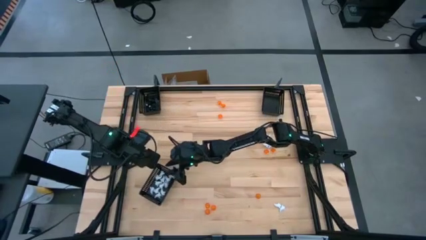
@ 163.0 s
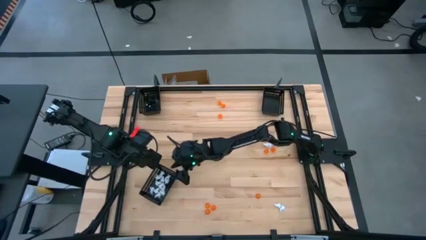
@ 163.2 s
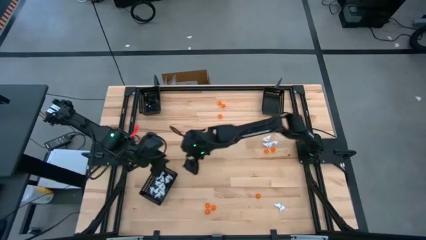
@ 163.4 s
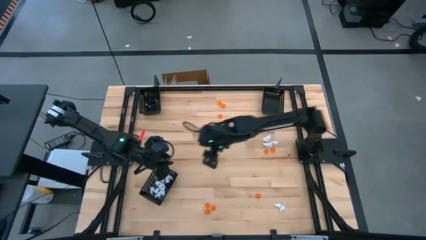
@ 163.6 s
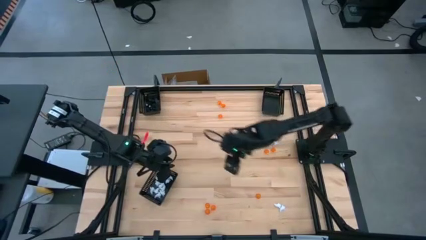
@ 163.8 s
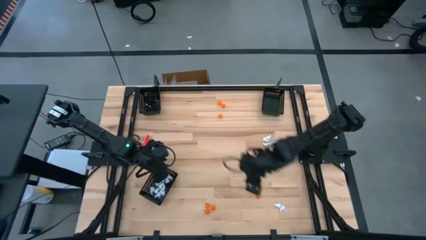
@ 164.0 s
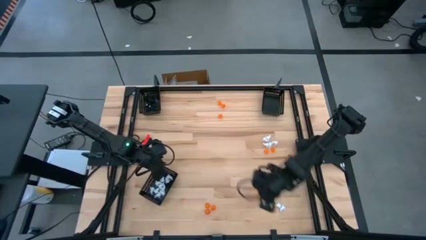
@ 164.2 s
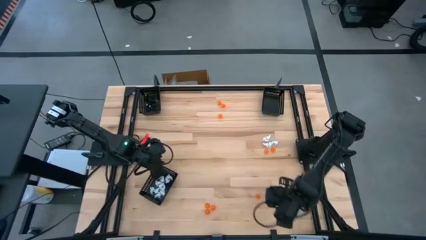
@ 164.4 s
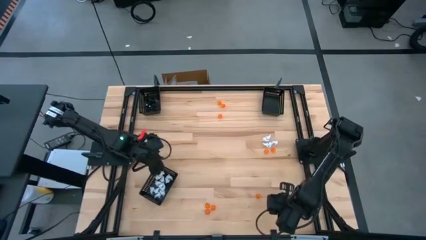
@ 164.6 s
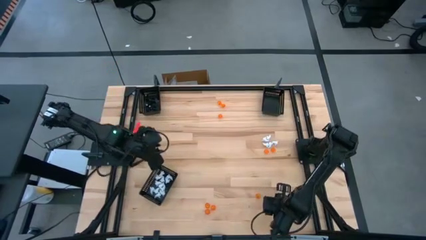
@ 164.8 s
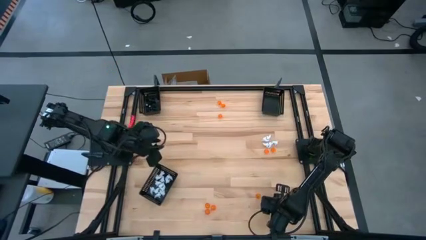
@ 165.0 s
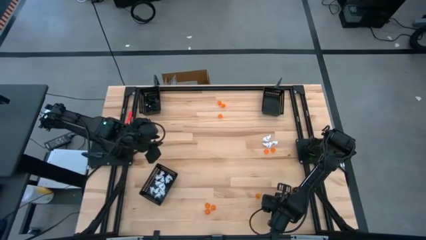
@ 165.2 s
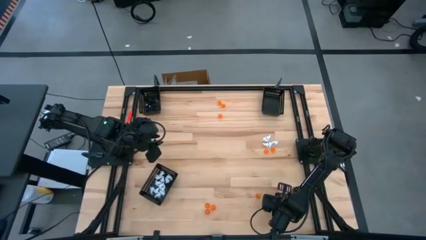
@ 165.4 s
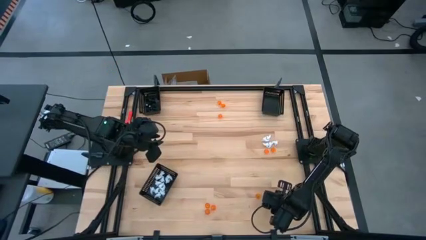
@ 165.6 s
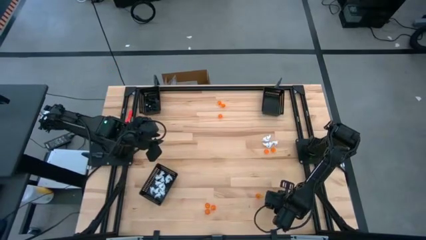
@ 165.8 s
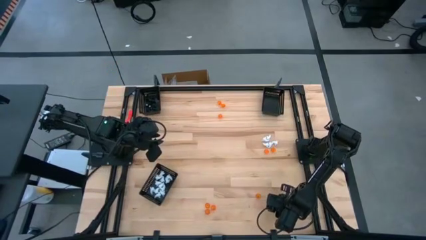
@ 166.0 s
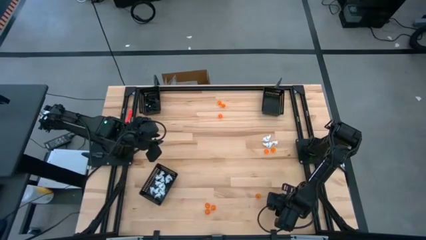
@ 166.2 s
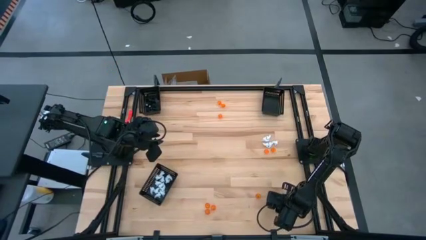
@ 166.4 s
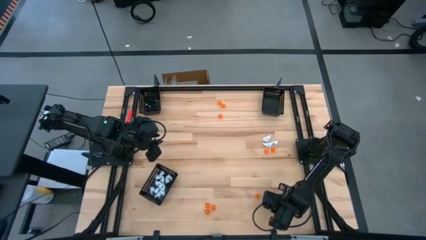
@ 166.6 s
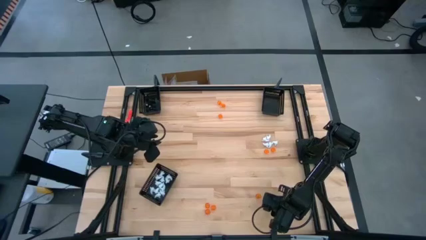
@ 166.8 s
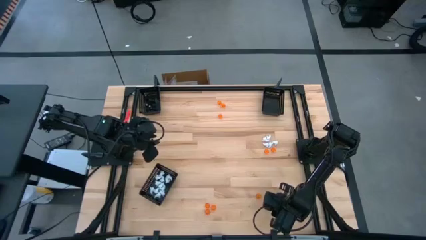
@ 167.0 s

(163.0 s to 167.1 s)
Task: Sort Halloween decoration
Put the white ghost toy into the bottom black basket

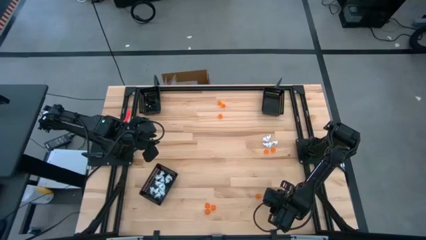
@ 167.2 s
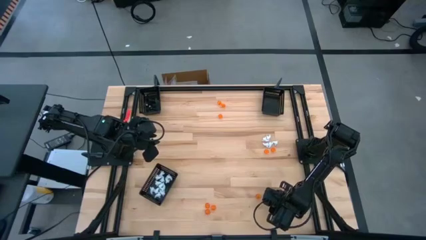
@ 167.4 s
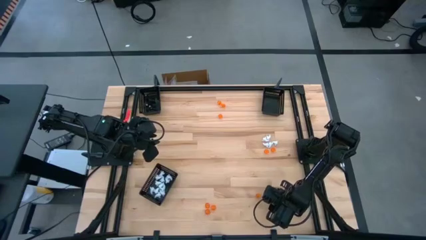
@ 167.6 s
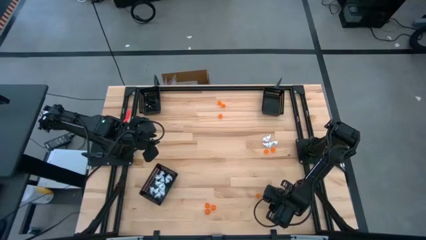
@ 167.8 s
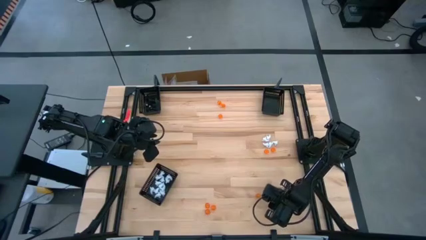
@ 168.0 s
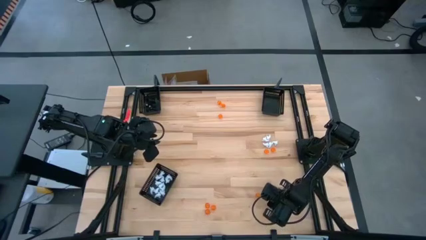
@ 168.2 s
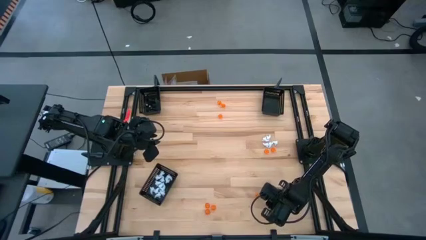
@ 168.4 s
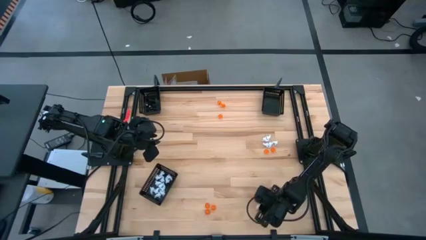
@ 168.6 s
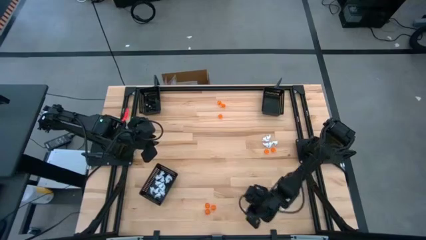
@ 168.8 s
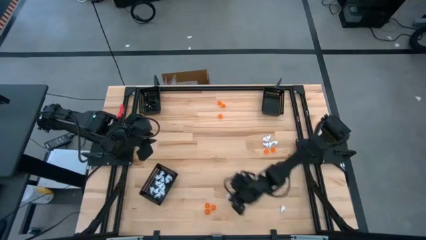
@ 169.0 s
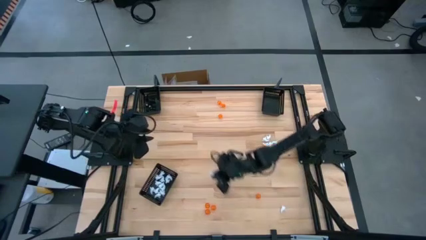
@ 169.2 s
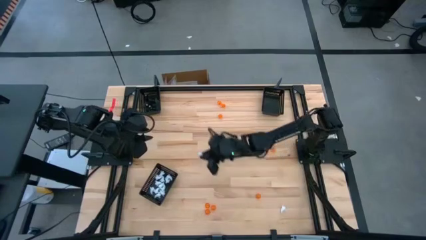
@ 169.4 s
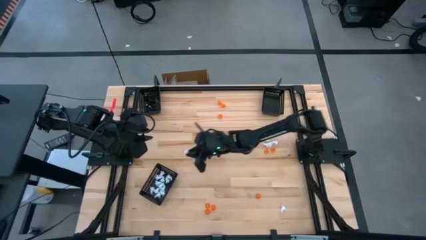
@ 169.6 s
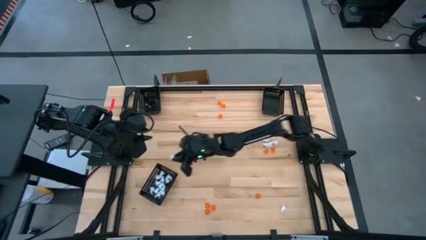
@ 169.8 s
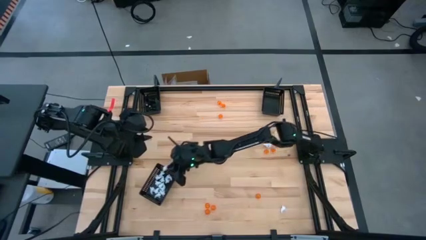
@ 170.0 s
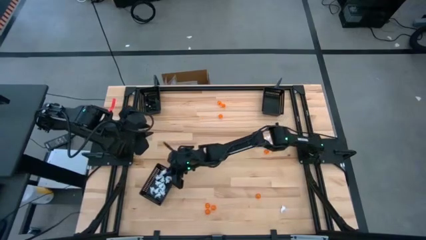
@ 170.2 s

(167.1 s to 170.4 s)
Put the white ghost toy into the bottom black basket

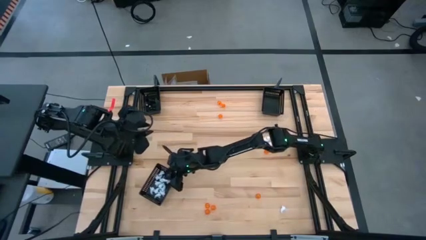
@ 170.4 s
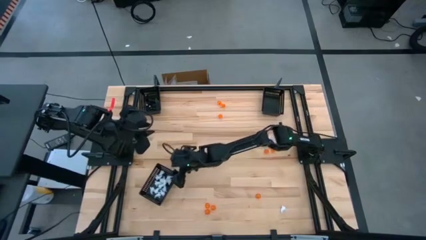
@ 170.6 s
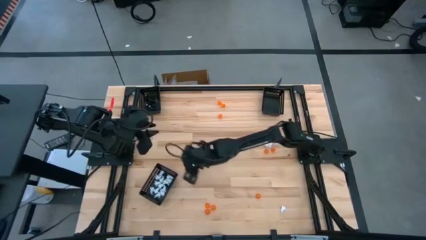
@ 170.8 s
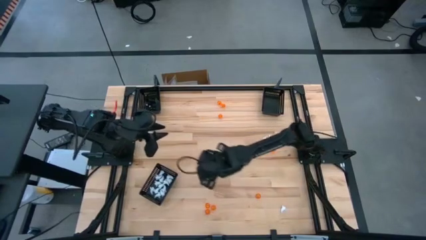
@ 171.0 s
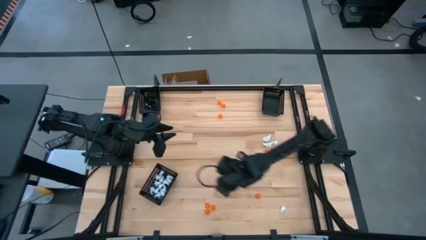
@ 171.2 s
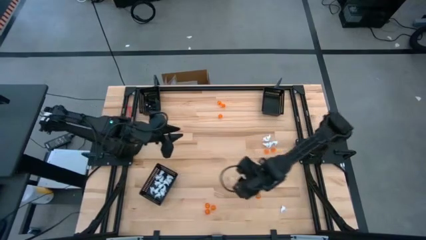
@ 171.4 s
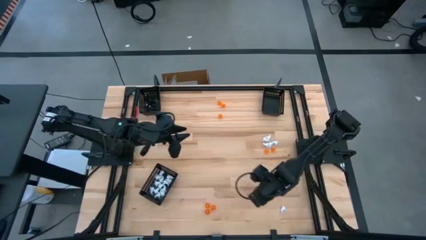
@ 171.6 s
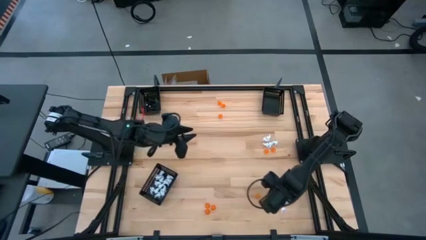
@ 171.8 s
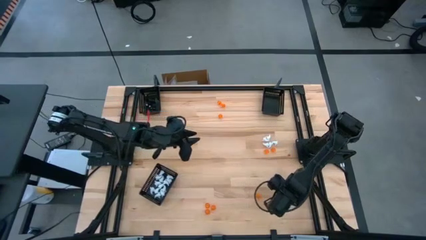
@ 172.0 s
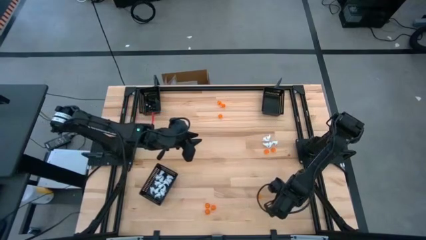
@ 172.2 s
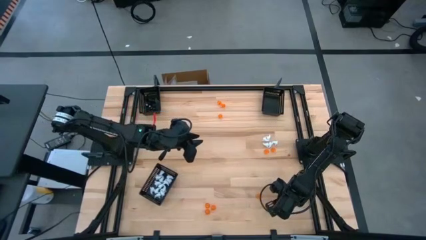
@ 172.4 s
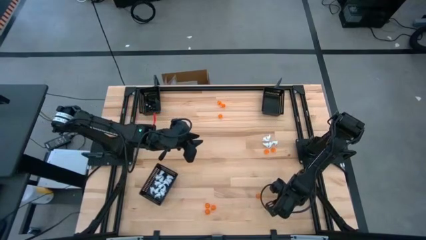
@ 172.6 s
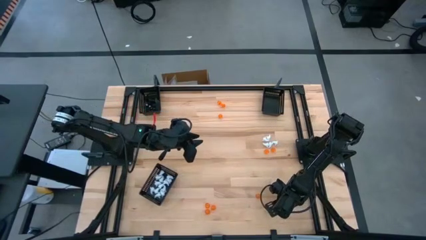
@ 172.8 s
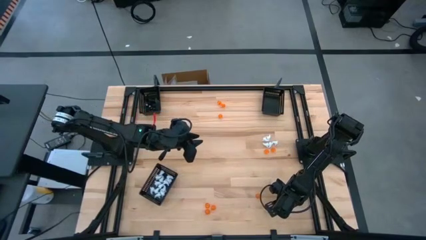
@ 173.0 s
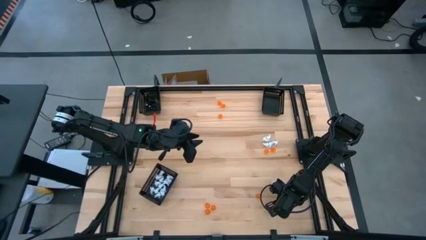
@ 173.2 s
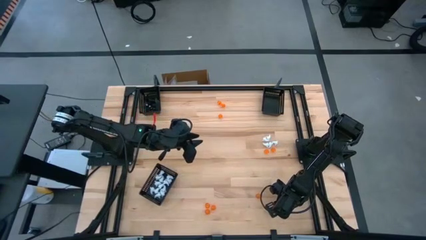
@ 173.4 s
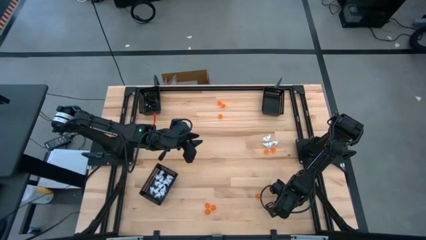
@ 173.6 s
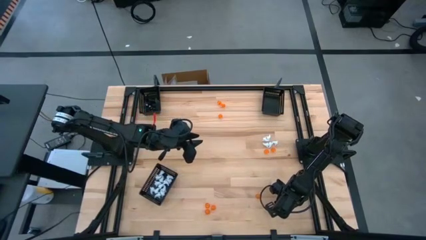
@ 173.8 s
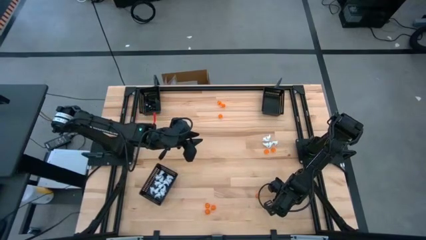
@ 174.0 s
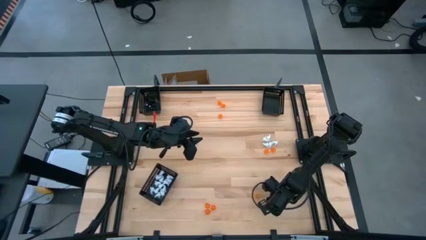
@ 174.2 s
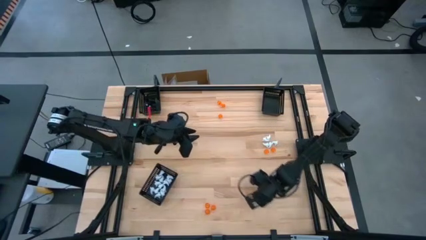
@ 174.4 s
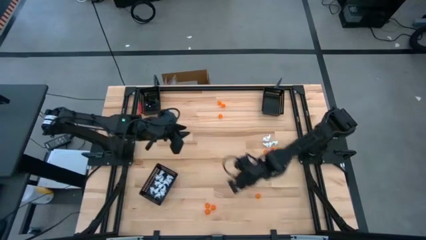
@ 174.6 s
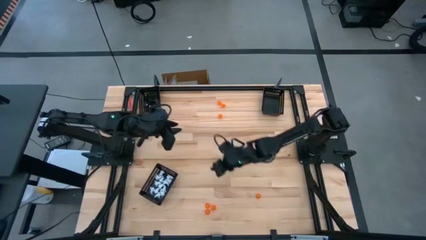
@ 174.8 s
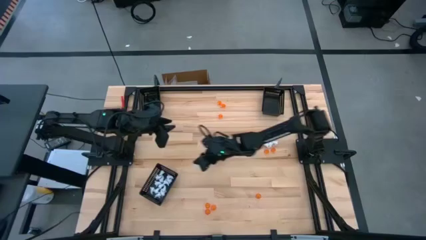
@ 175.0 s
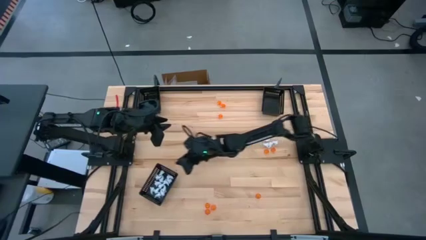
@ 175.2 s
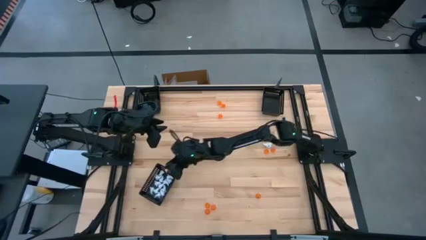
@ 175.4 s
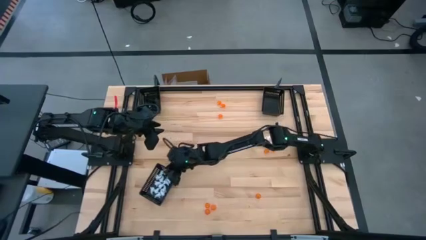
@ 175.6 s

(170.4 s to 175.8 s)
Put the white ghost toy into the bottom black basket

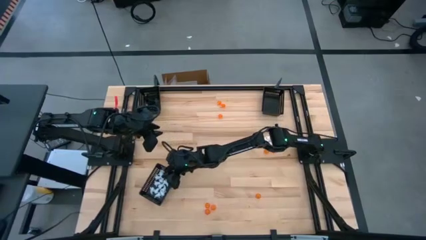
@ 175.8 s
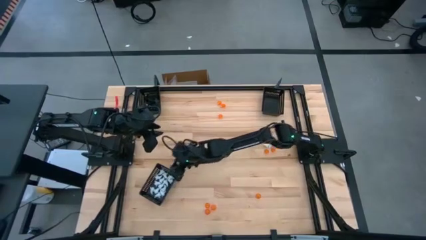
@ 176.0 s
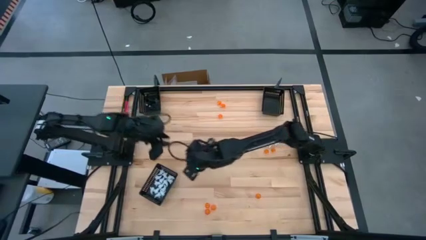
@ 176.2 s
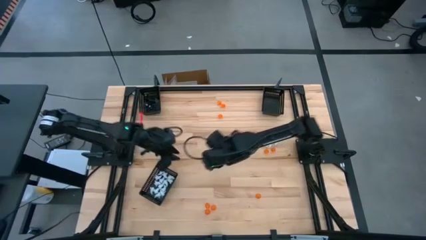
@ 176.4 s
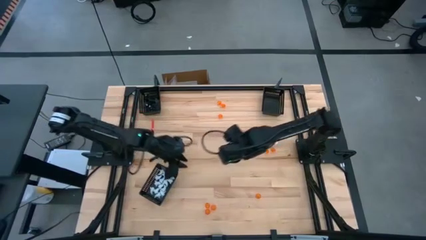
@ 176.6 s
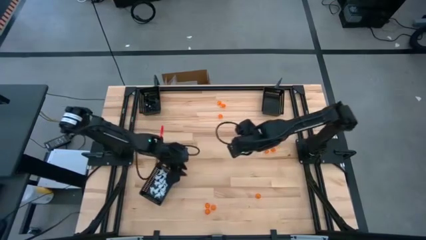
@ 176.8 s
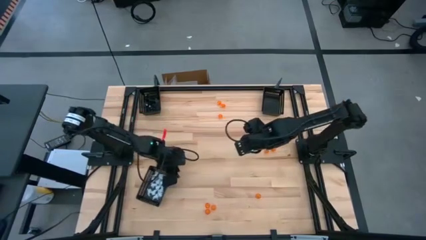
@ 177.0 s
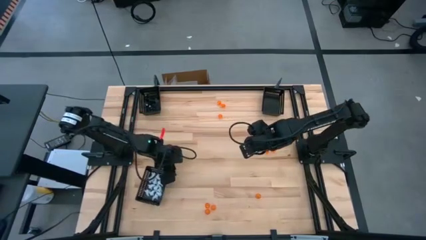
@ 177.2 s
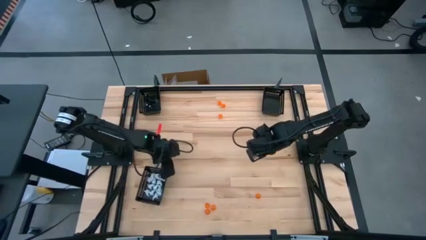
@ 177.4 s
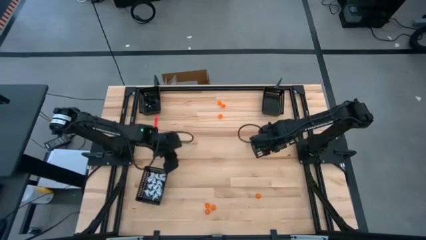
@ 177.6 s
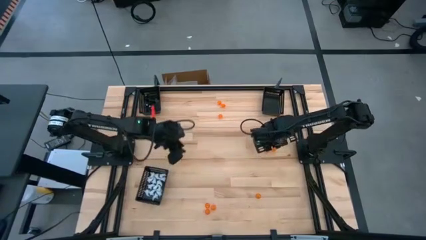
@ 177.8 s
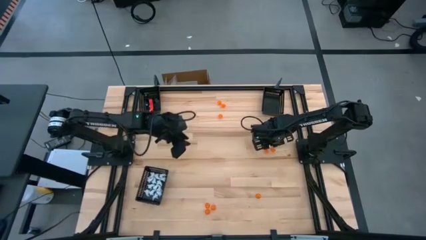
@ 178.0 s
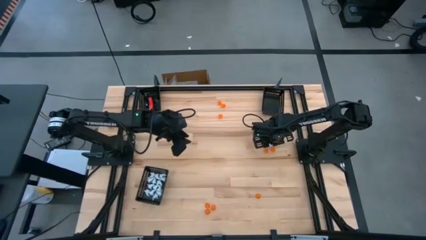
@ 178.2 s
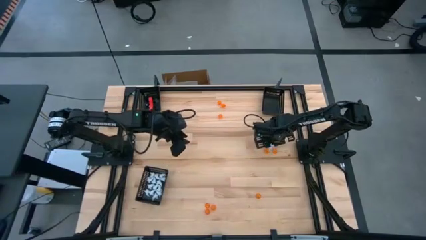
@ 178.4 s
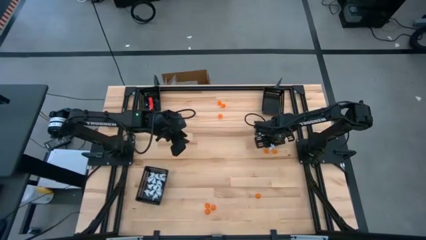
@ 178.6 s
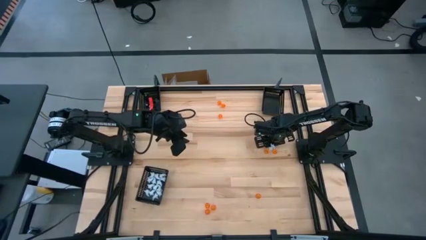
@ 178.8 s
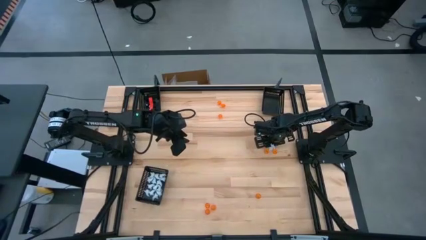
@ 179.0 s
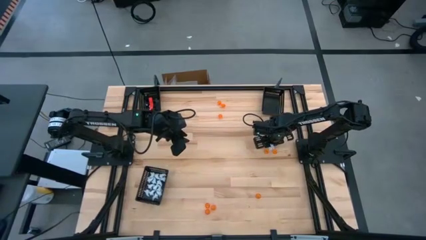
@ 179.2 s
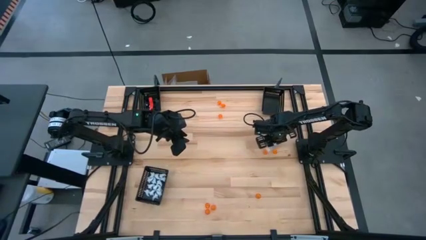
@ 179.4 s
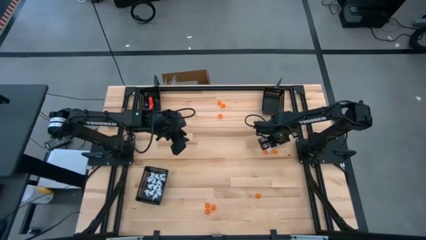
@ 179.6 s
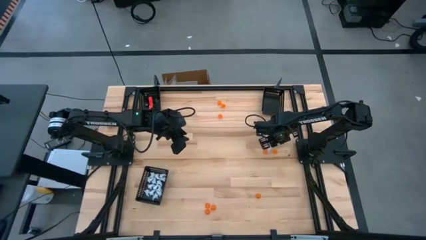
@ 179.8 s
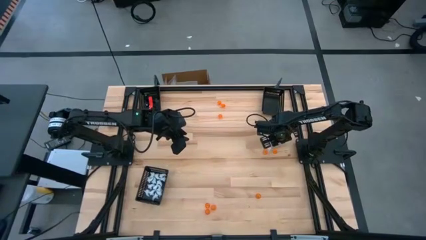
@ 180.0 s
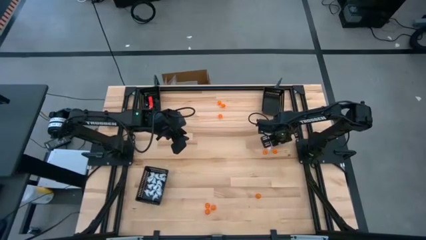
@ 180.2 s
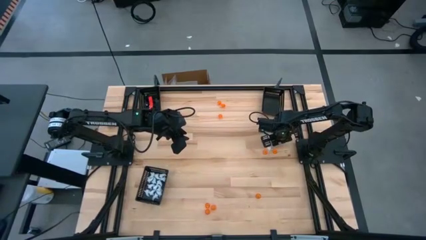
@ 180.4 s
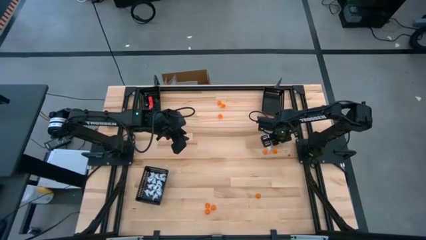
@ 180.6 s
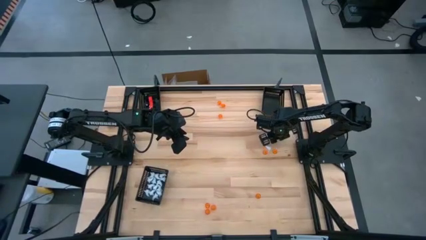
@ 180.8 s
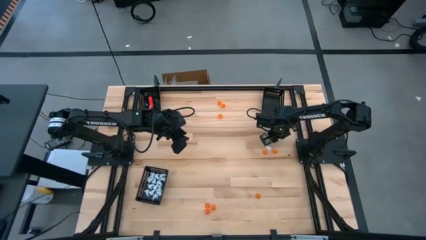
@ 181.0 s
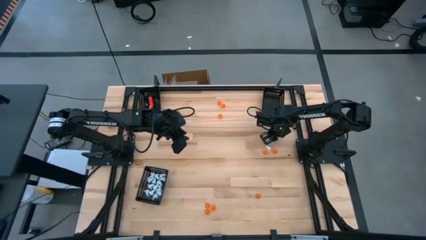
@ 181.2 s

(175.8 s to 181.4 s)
Put the white ghost toy into the bottom black basket
